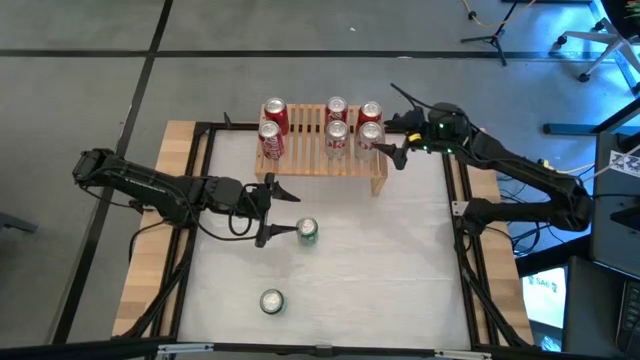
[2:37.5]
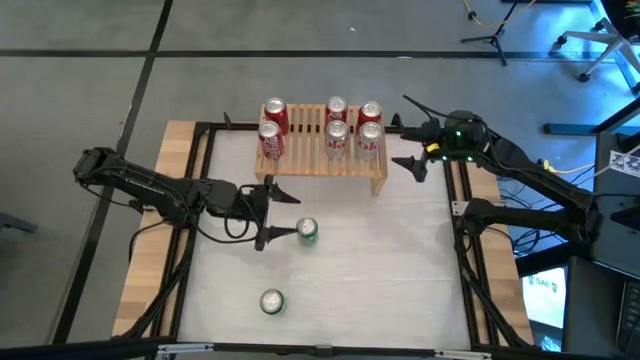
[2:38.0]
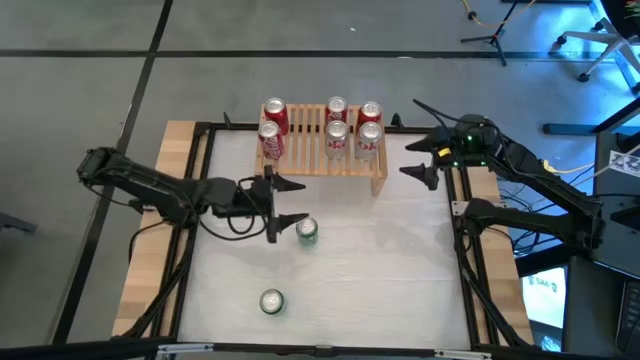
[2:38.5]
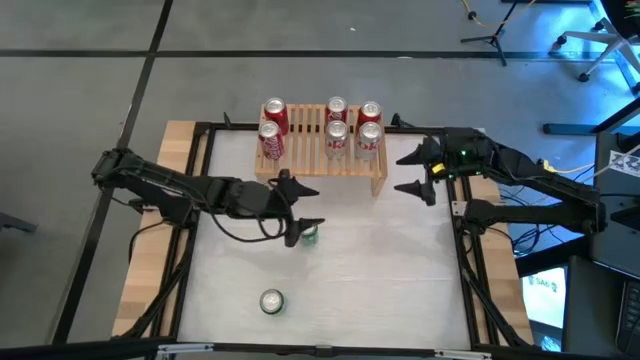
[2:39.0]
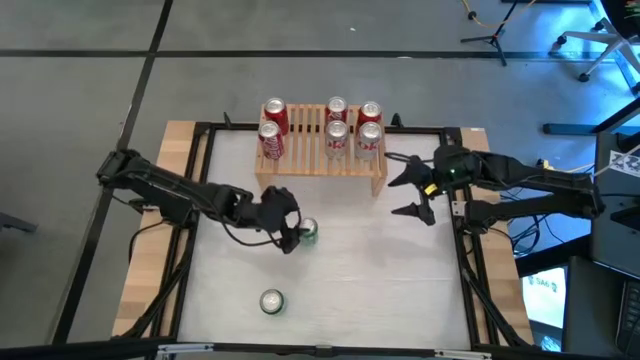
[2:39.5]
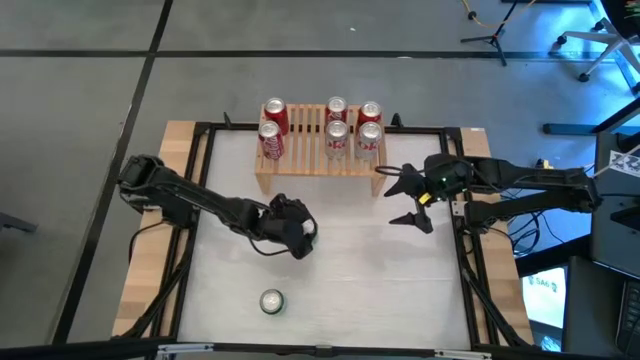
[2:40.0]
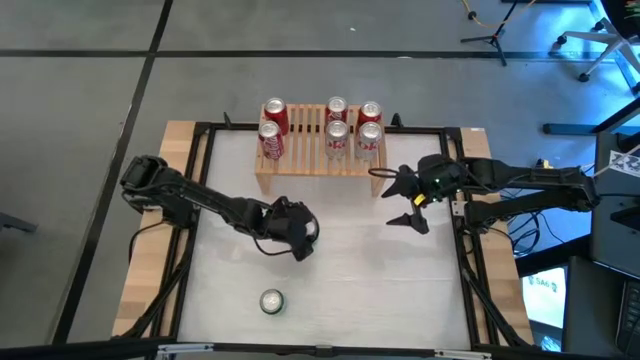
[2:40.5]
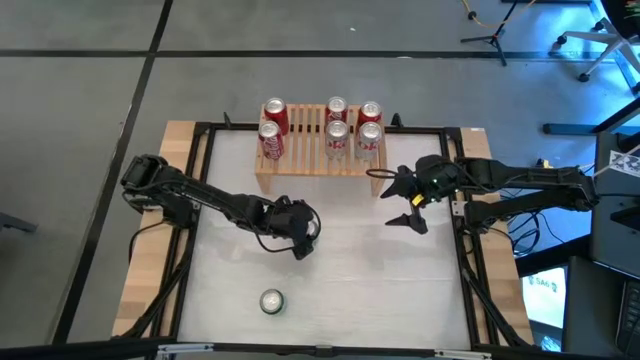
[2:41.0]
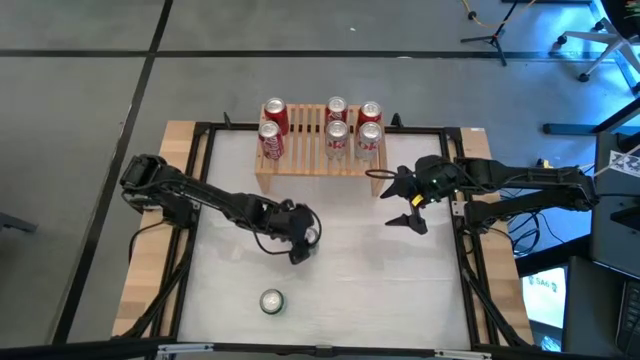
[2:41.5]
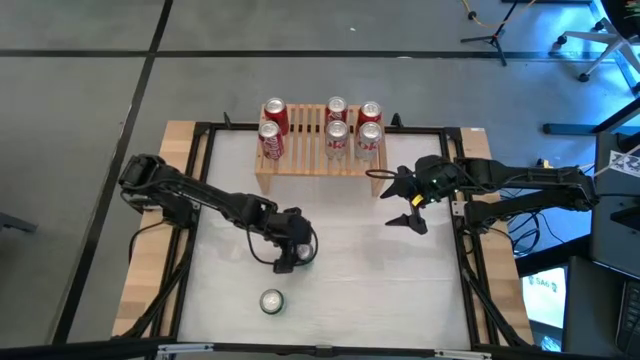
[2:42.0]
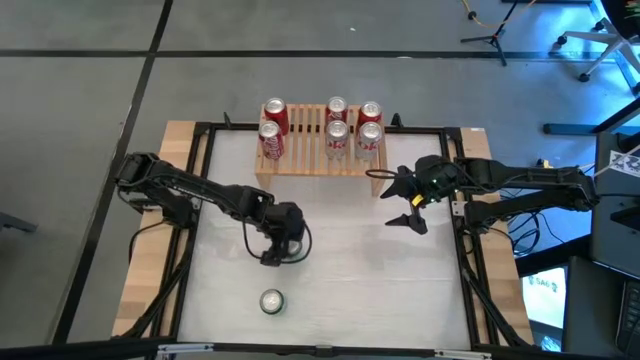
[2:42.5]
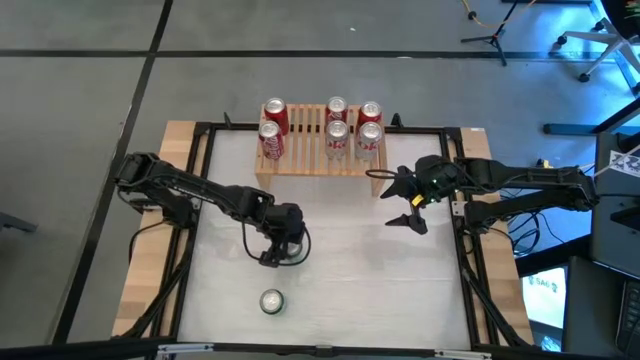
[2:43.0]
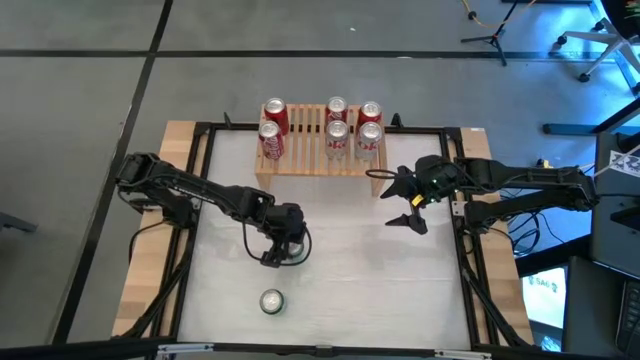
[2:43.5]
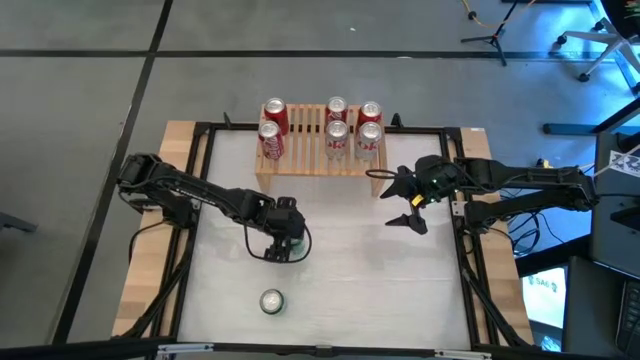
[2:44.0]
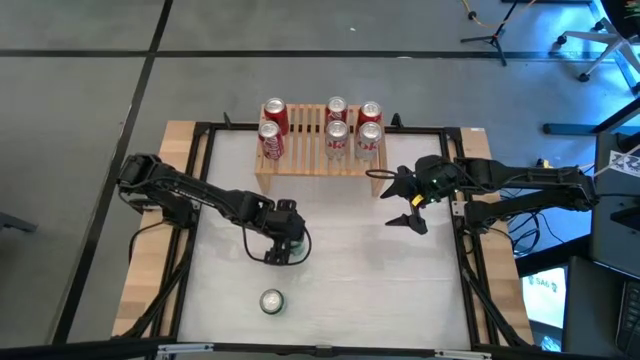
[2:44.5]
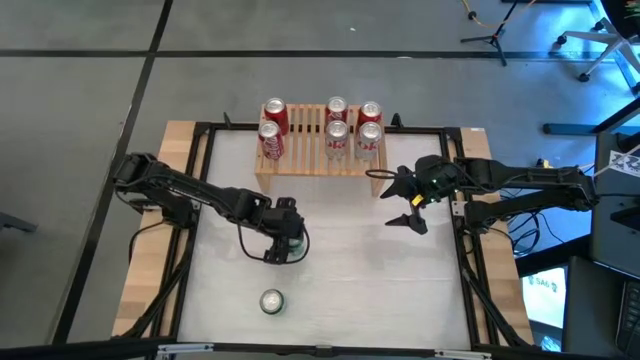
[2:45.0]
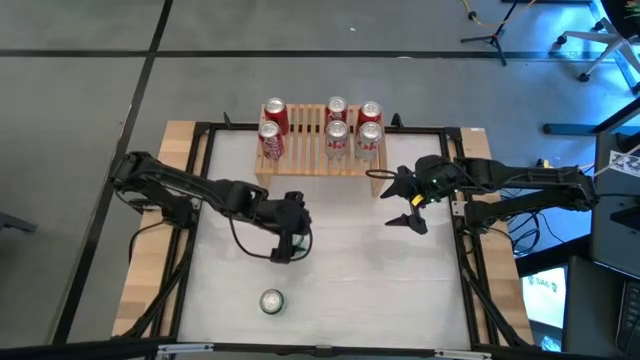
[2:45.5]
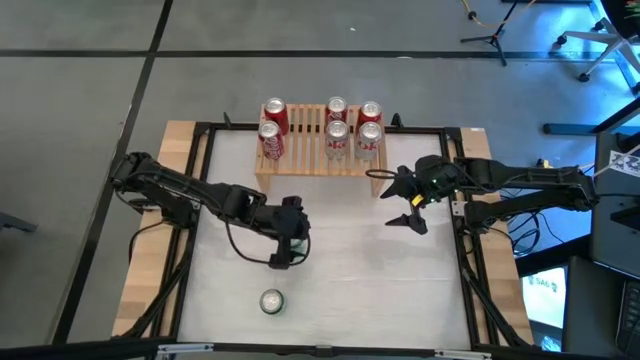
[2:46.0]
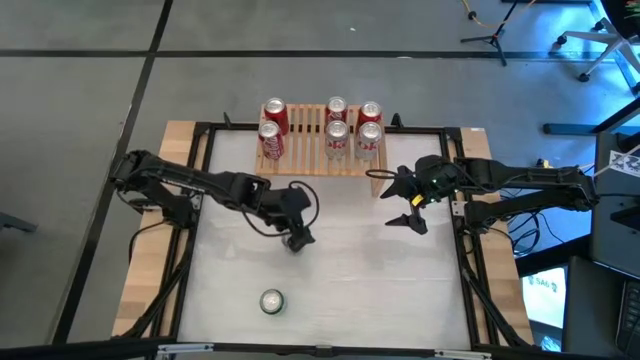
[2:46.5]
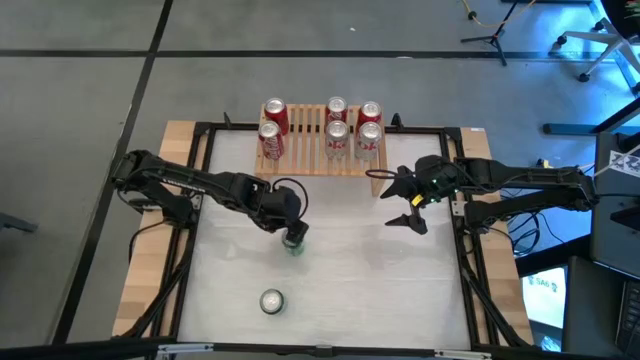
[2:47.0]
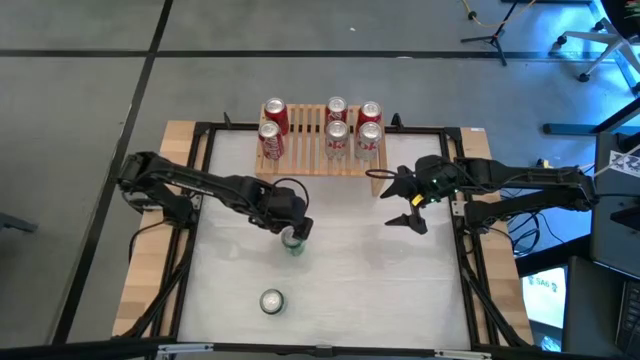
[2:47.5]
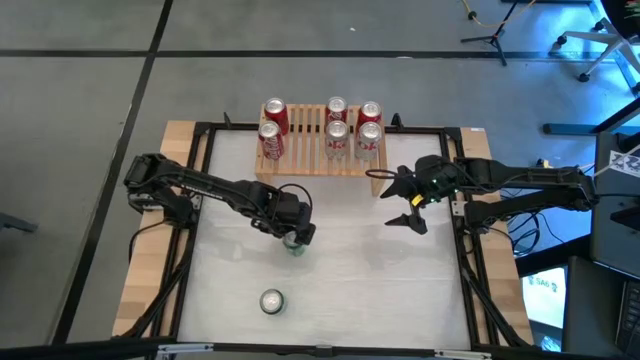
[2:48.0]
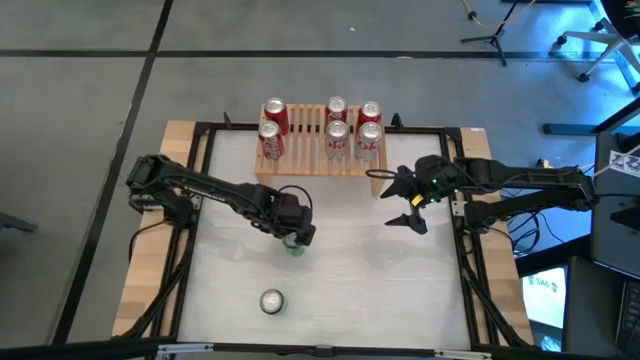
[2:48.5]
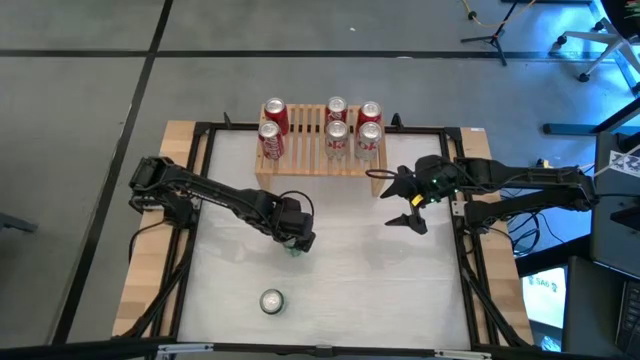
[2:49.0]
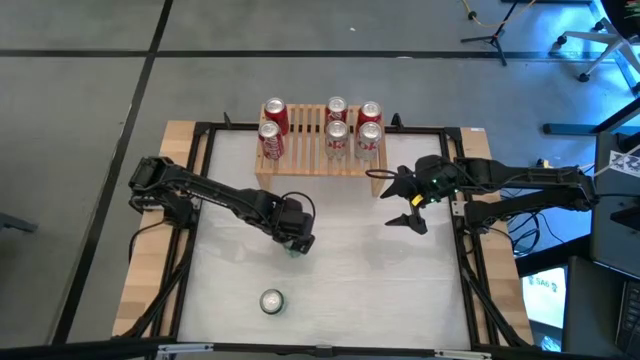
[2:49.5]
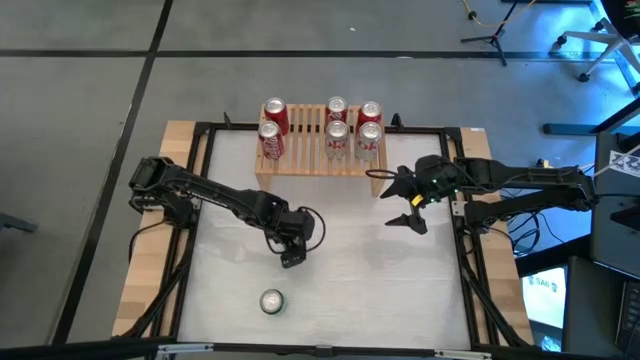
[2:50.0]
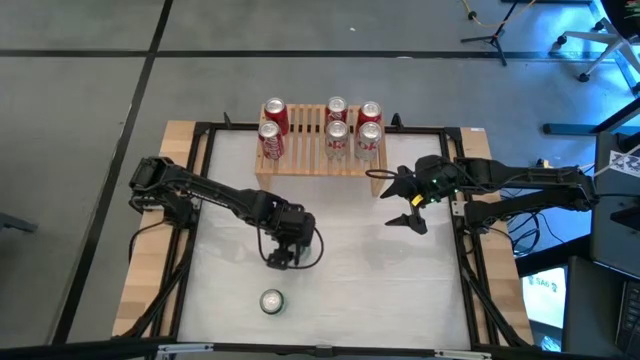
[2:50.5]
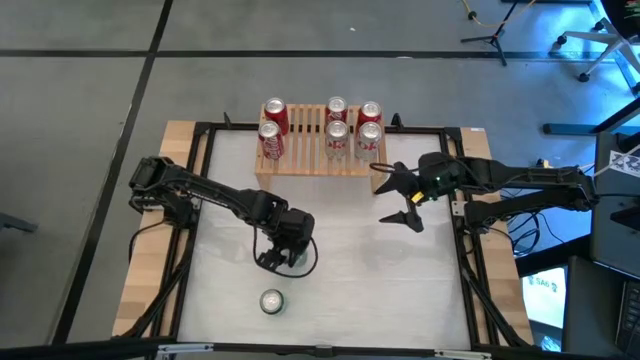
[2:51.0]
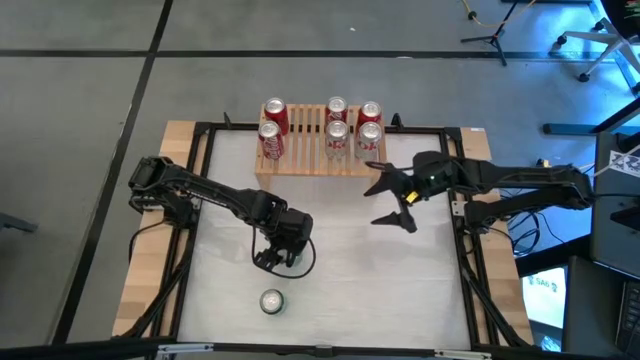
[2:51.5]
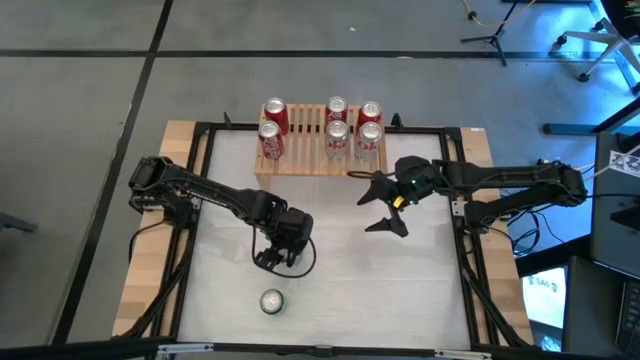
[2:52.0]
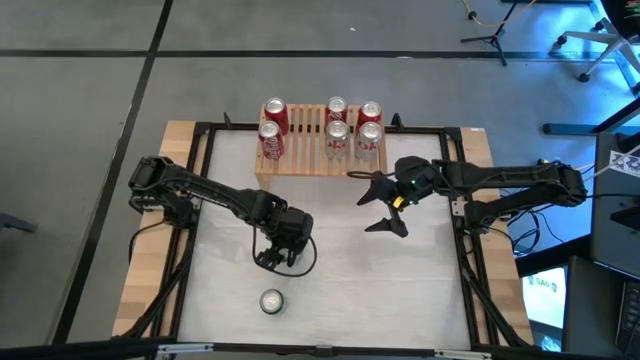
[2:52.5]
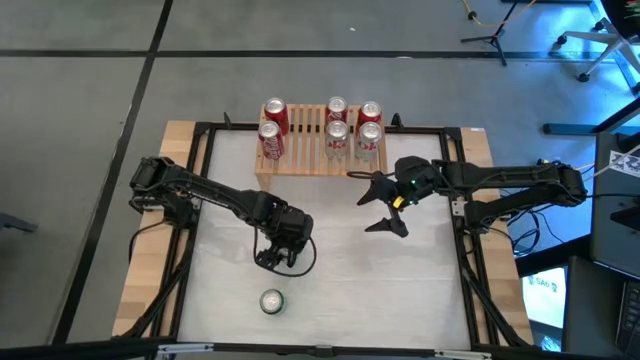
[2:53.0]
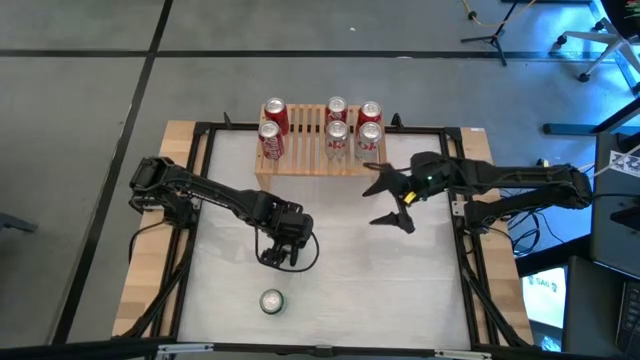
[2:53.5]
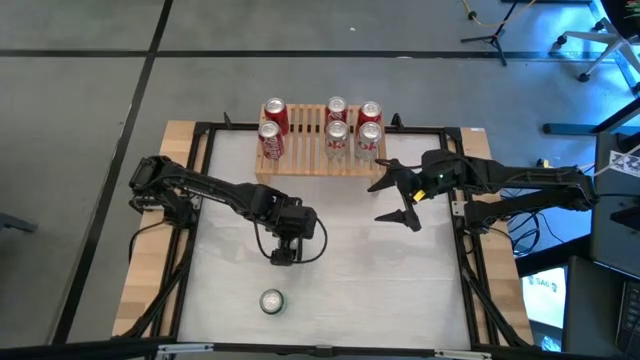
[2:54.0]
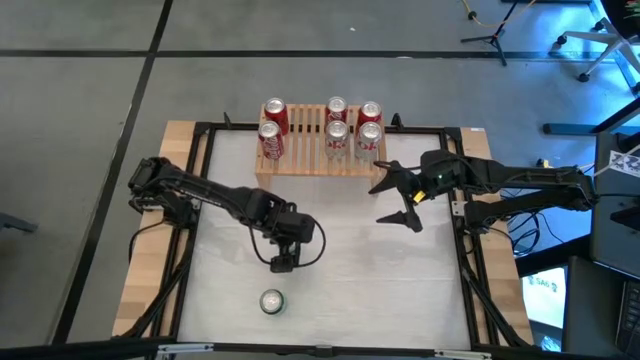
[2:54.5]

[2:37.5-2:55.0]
Task: Place canned beverage on shelf
Put the top green soda can on the shelf

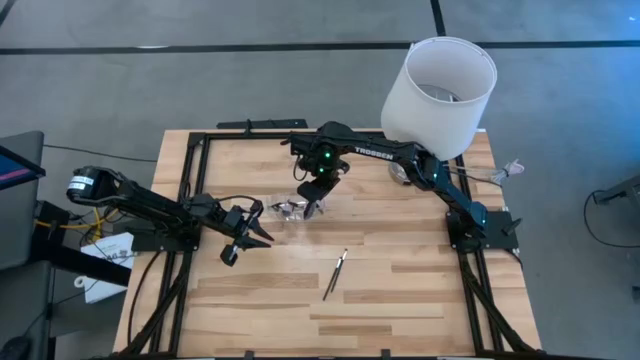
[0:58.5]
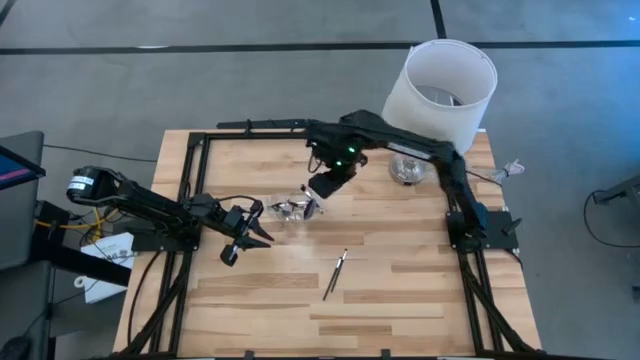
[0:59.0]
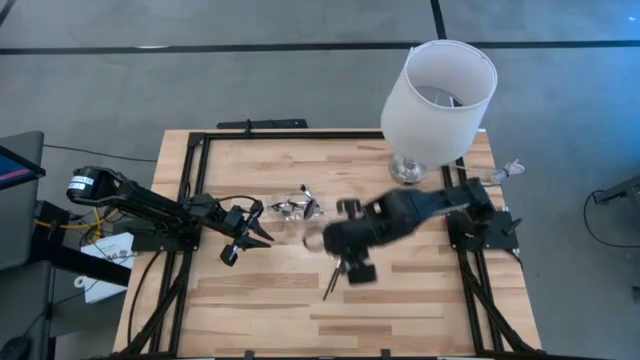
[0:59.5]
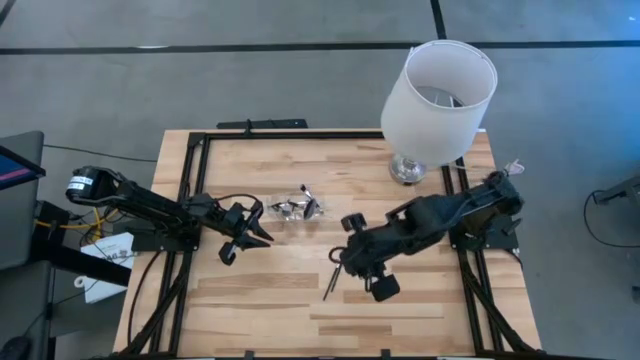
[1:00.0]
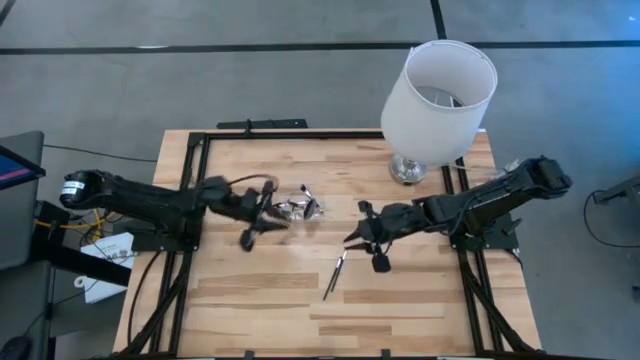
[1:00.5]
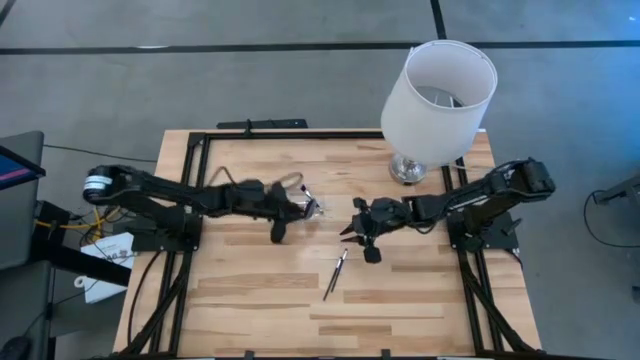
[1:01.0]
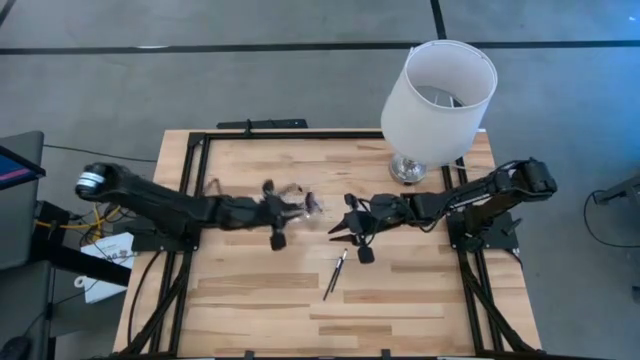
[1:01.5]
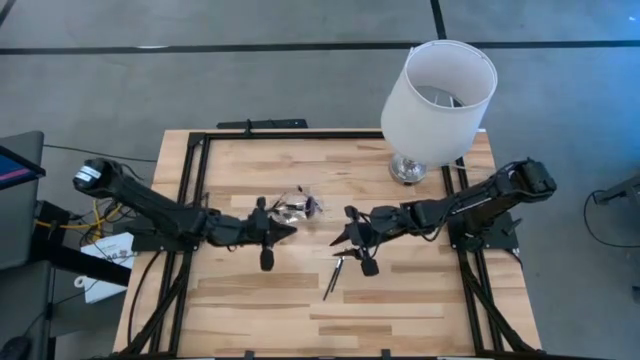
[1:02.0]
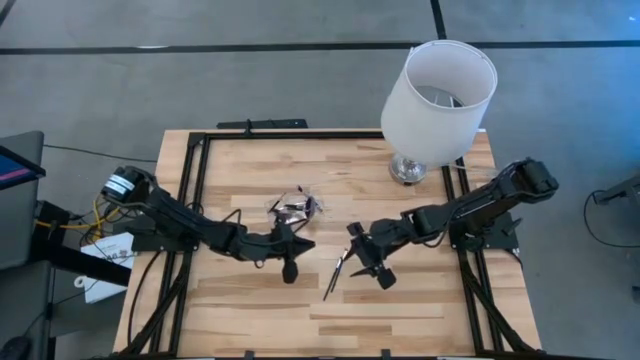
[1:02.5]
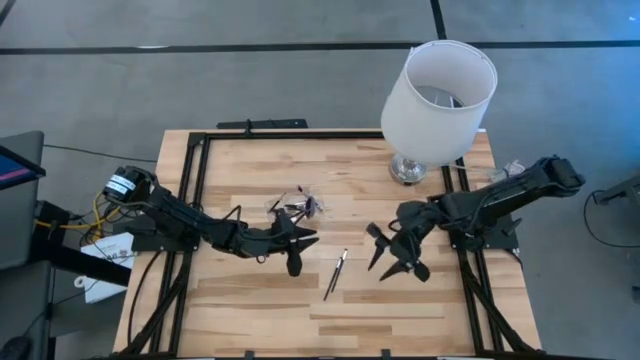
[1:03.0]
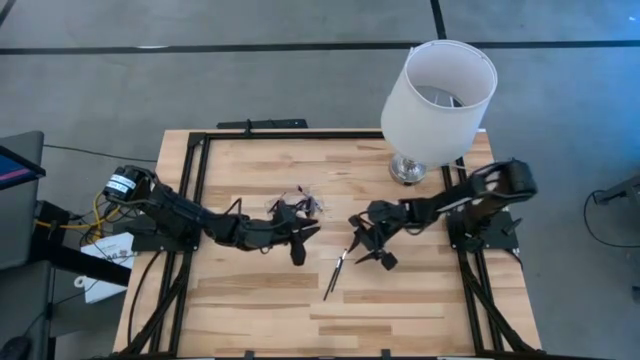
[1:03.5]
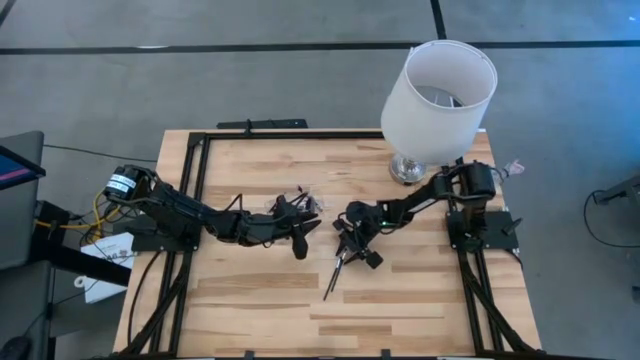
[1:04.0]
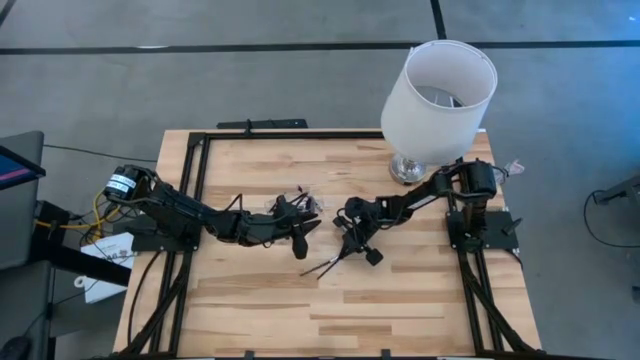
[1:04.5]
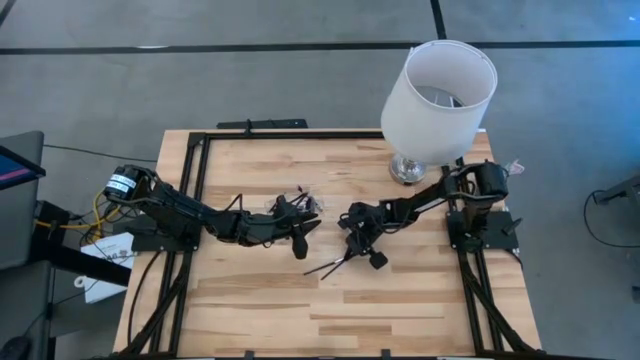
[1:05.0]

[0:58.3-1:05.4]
Task: Pick & Place Makeup Supplies
Put the black makeup brush into the transparent organizer
